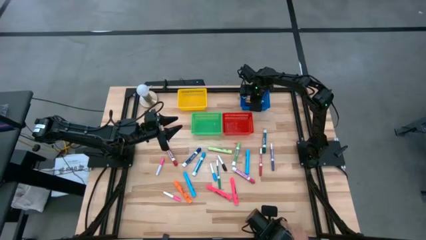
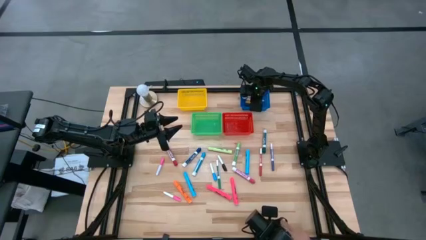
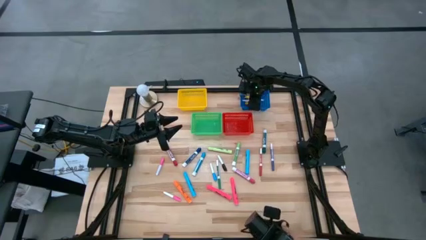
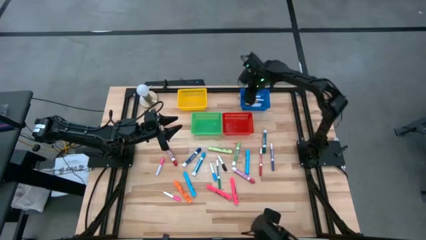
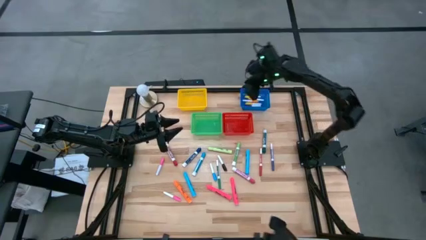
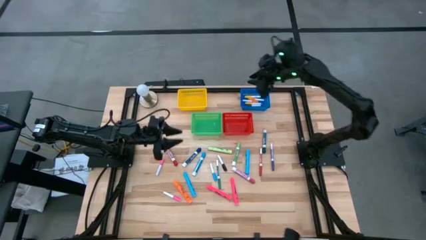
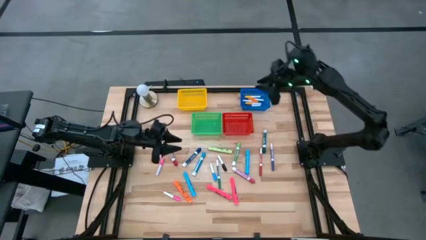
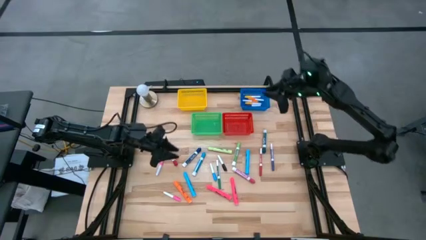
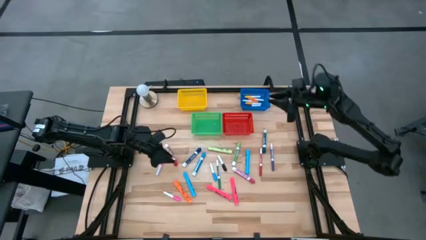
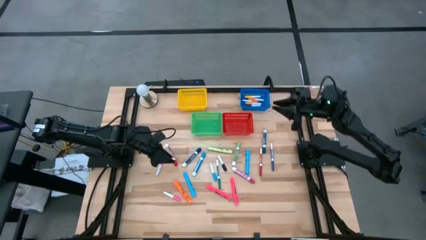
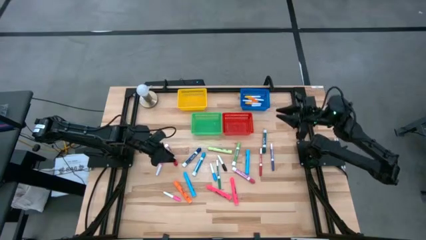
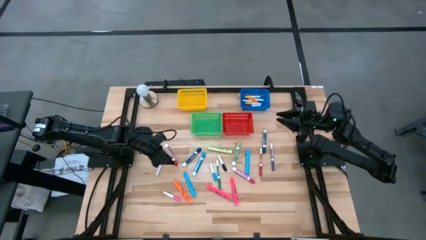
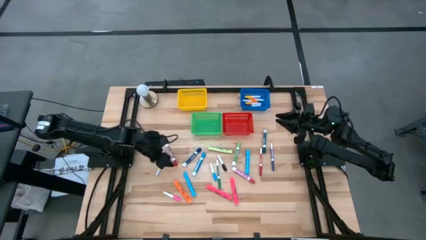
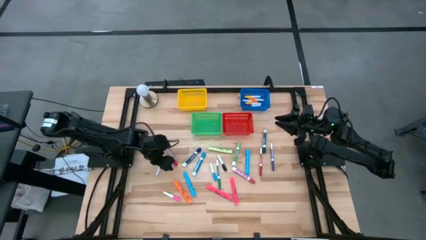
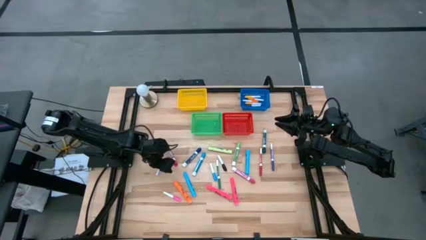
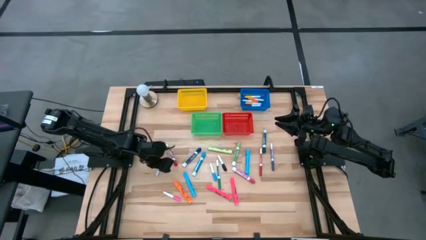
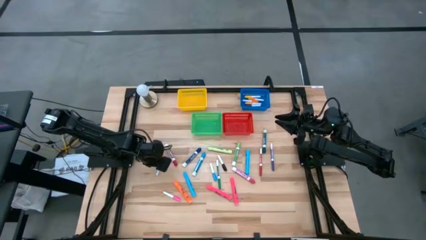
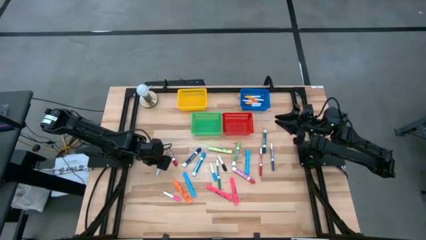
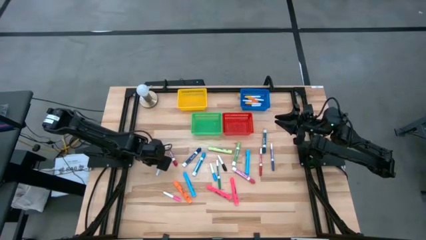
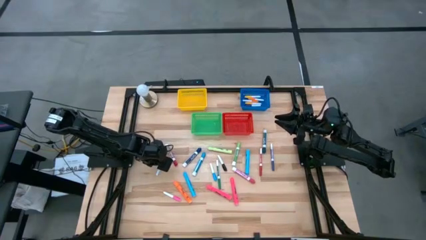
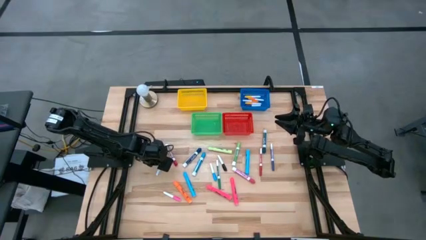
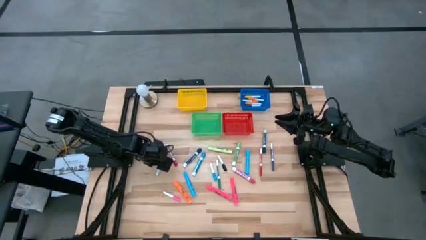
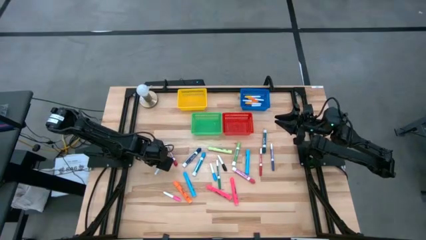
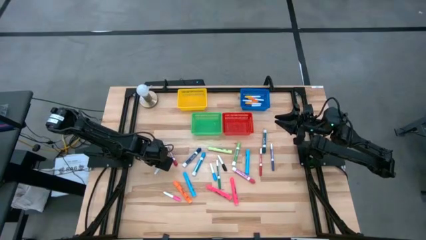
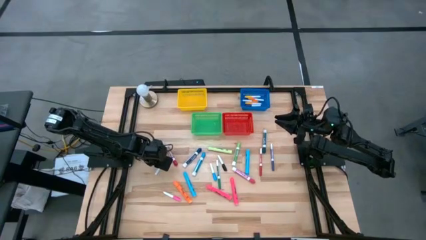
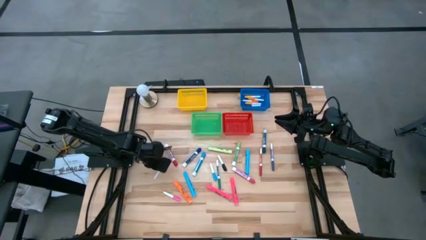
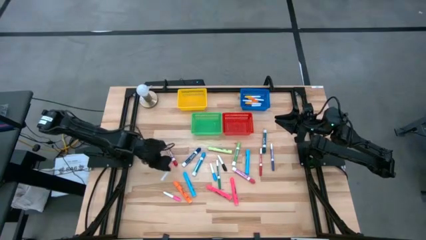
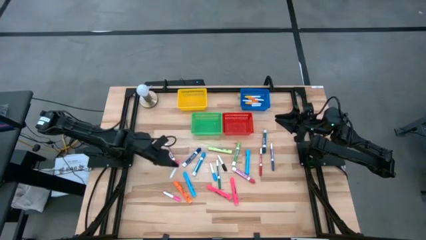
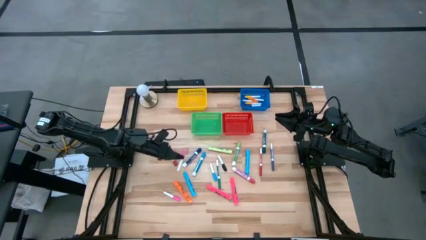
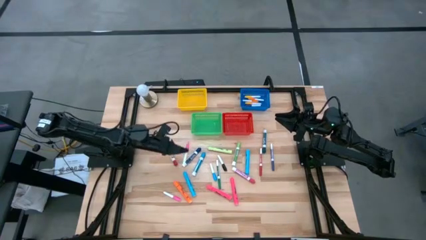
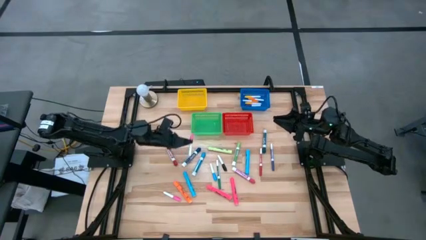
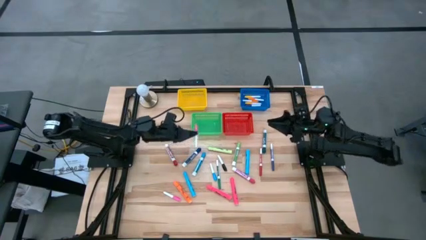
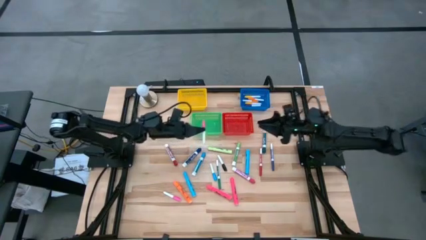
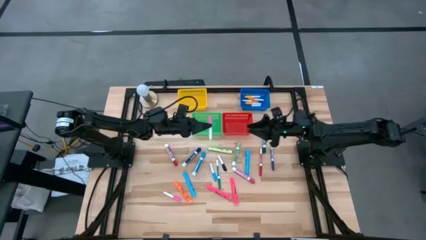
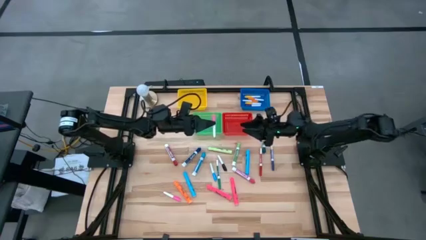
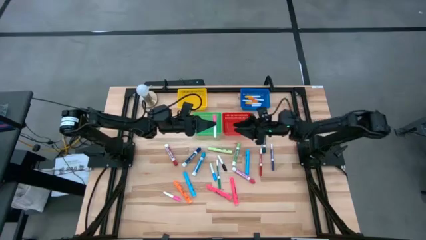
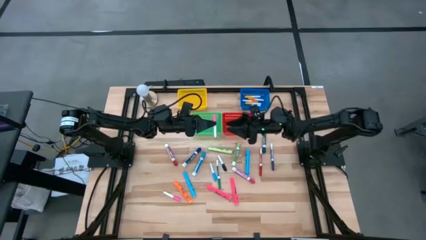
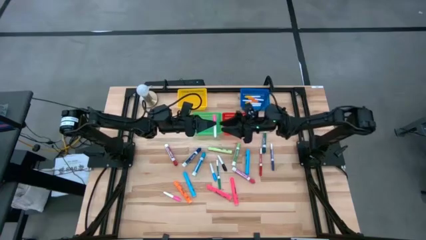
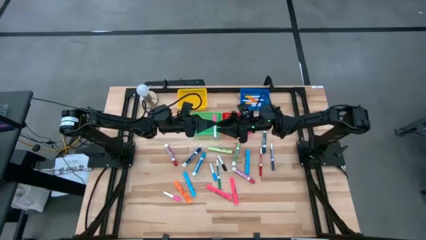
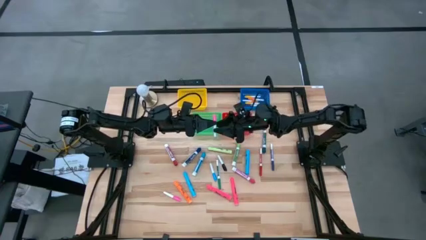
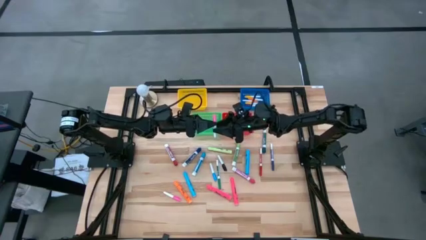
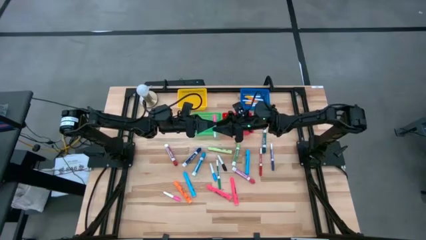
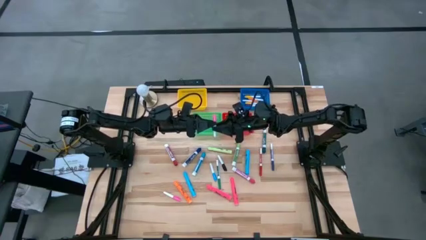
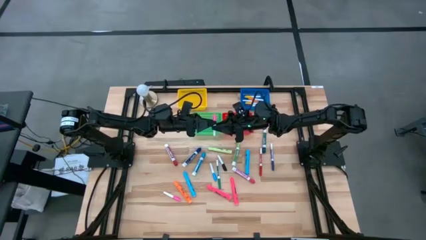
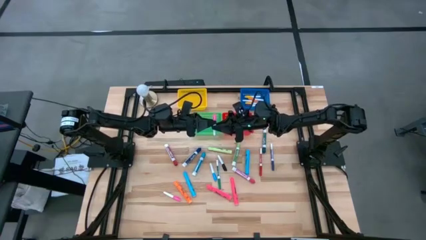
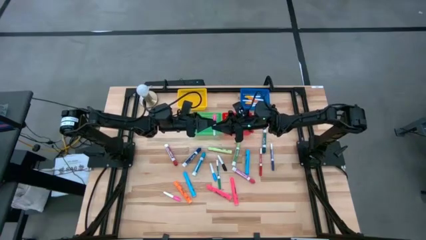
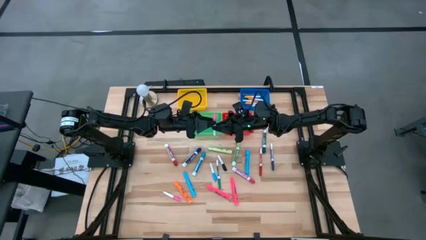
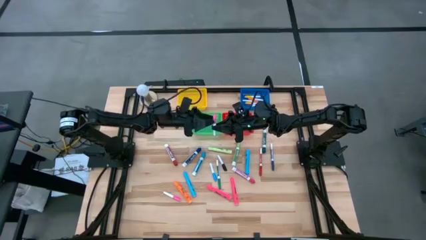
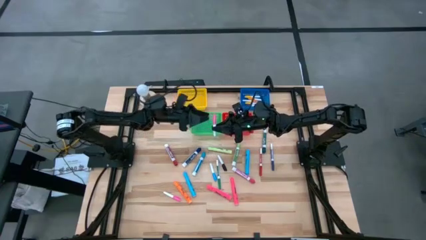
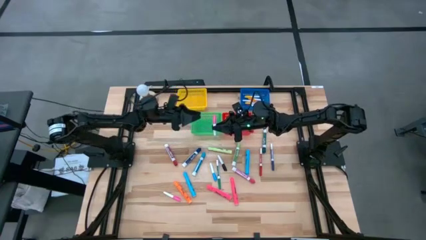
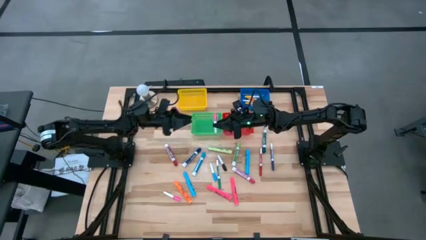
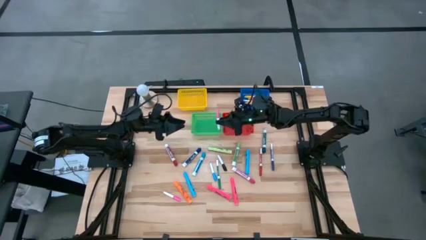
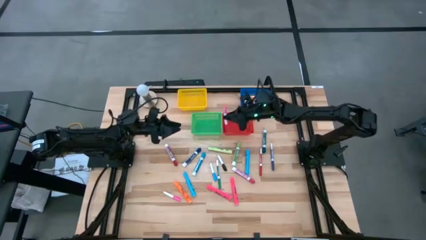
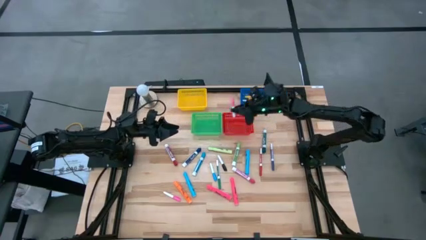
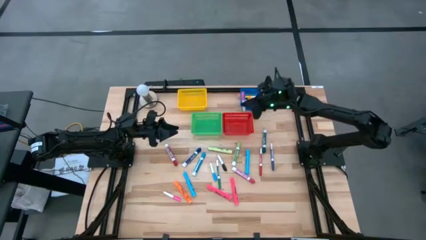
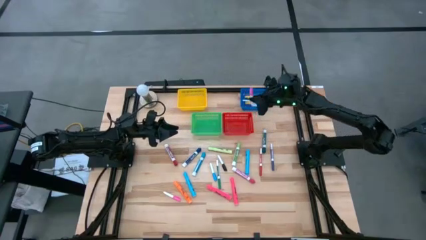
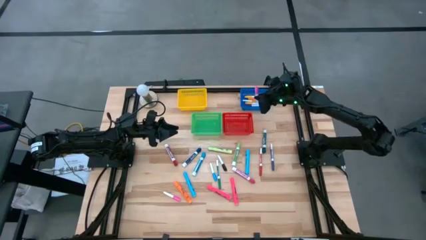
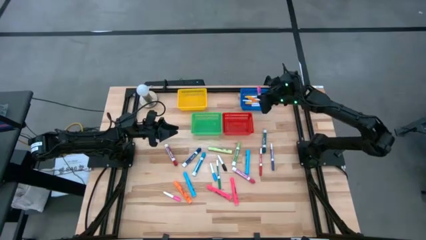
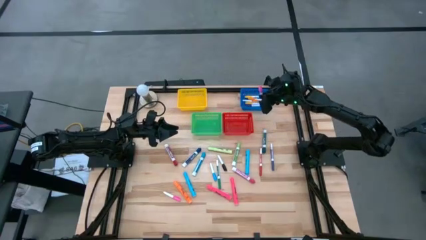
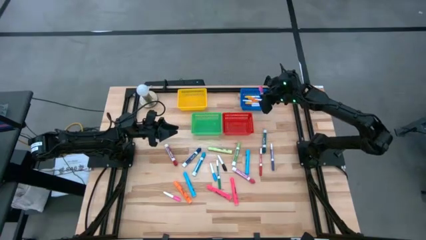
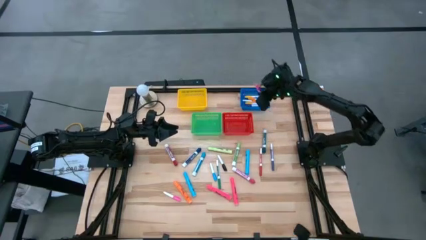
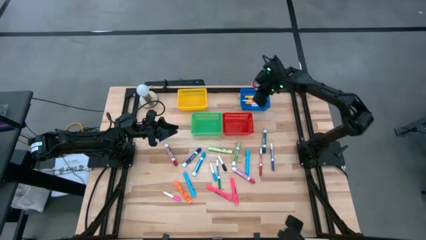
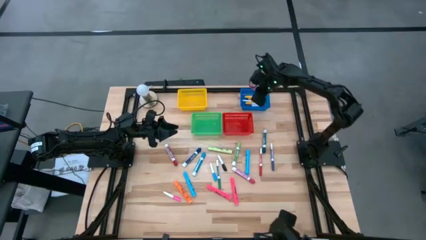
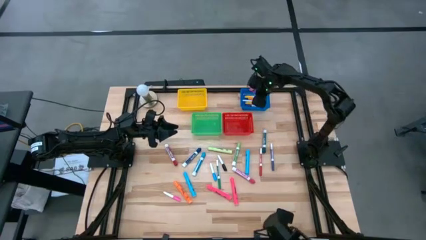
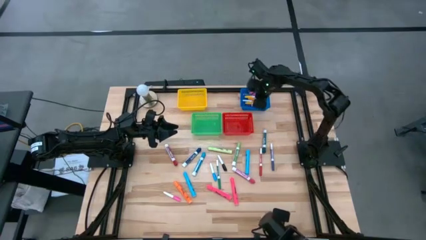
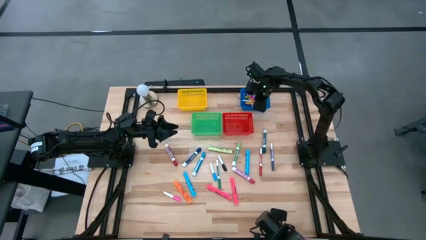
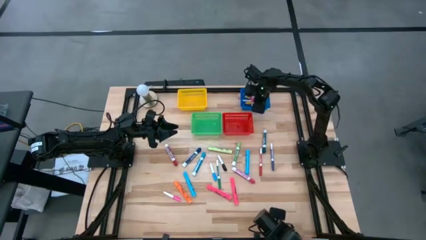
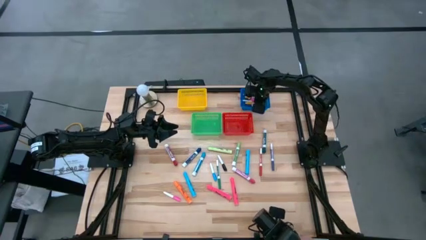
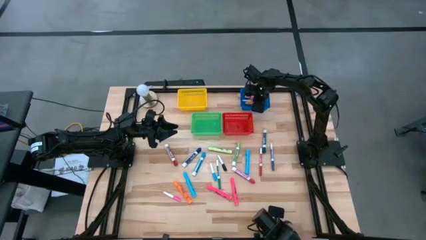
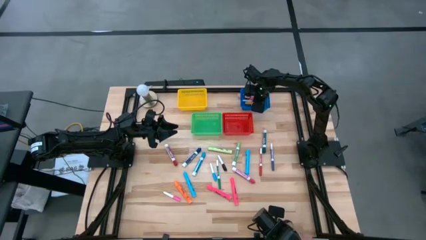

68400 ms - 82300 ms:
Task: Pick & Place Markers
Put the pink highlighter into the blue bin
